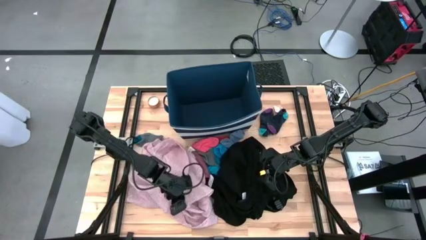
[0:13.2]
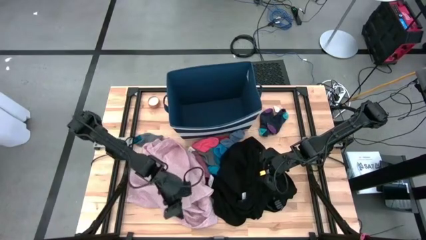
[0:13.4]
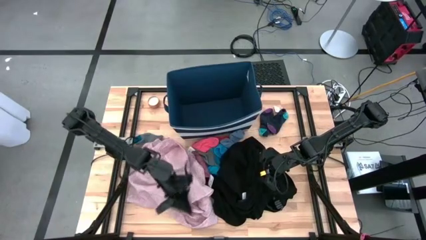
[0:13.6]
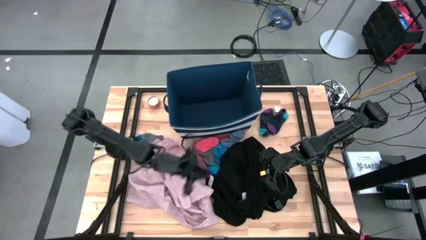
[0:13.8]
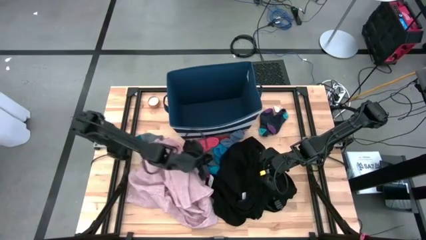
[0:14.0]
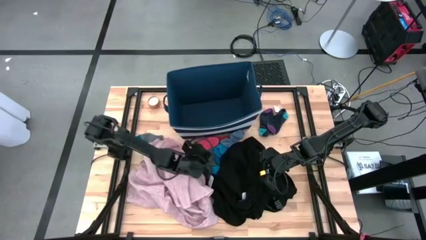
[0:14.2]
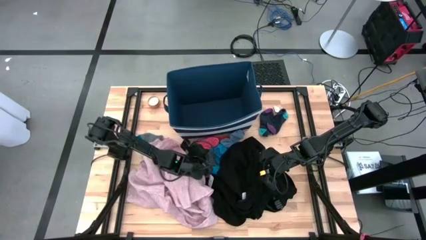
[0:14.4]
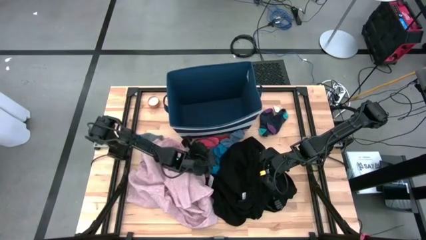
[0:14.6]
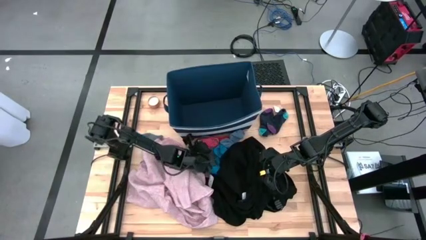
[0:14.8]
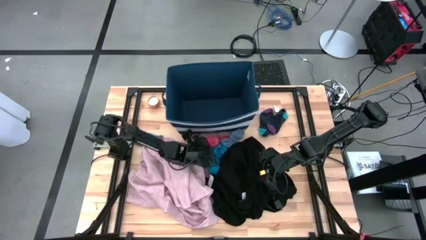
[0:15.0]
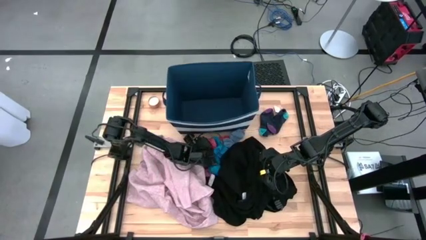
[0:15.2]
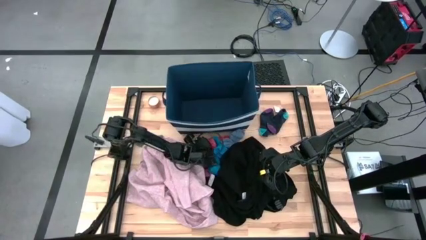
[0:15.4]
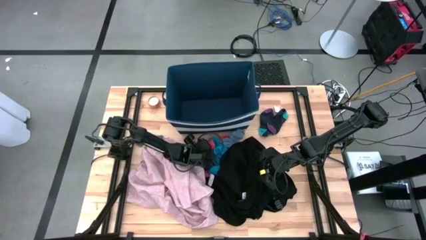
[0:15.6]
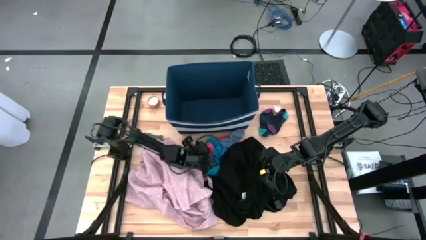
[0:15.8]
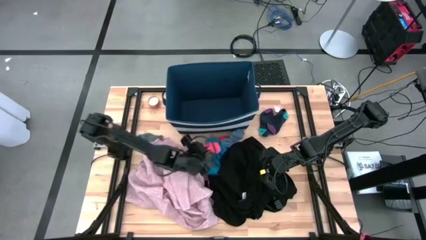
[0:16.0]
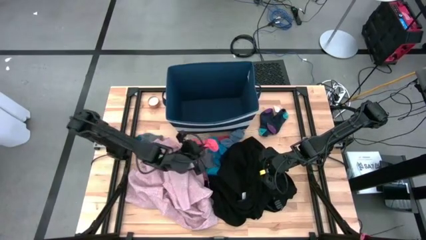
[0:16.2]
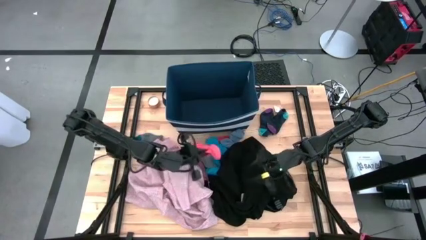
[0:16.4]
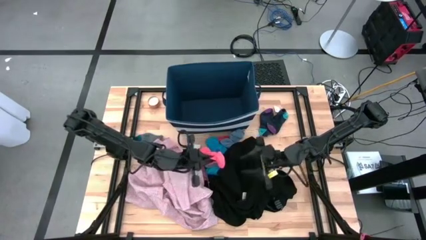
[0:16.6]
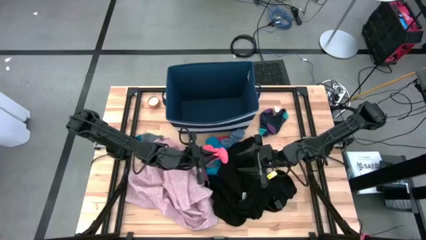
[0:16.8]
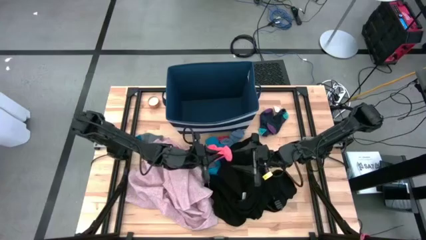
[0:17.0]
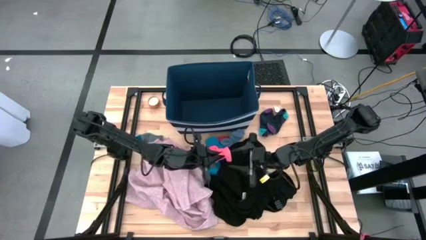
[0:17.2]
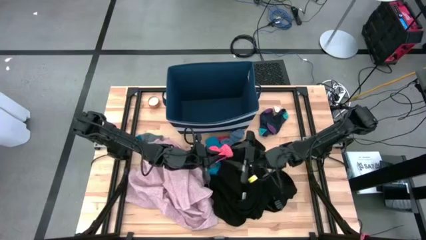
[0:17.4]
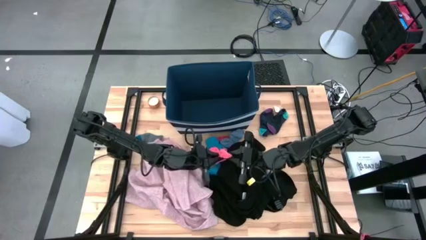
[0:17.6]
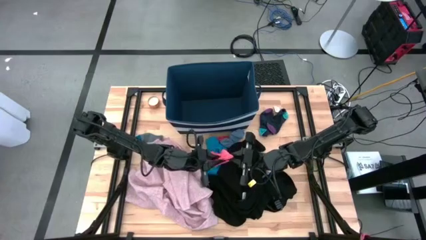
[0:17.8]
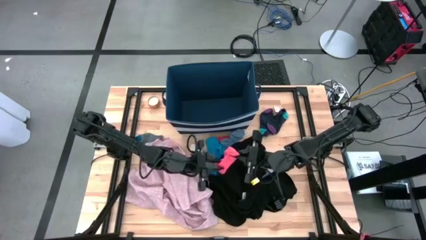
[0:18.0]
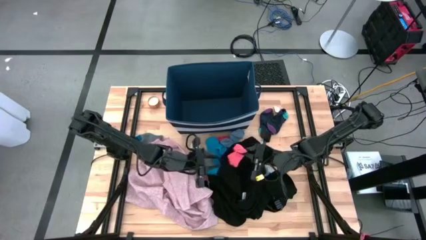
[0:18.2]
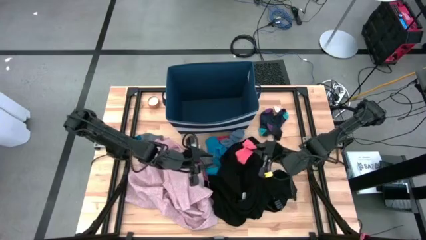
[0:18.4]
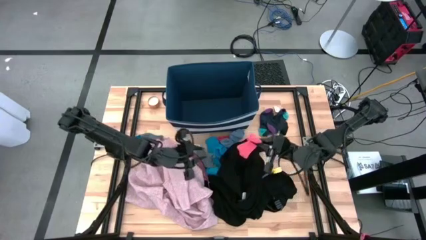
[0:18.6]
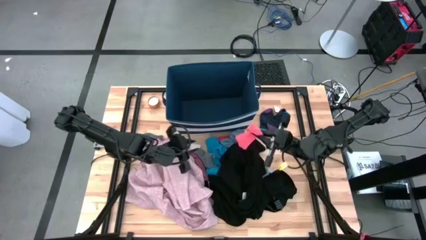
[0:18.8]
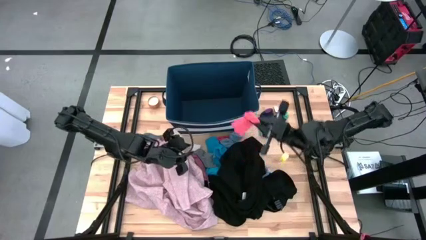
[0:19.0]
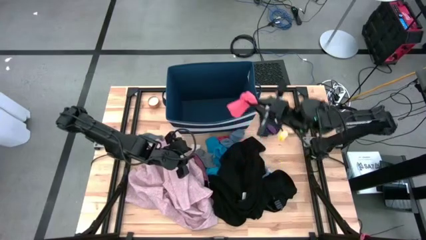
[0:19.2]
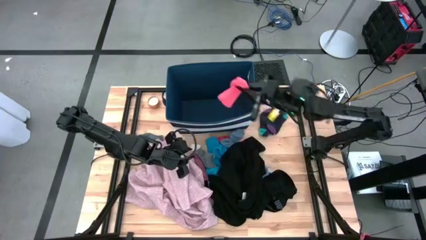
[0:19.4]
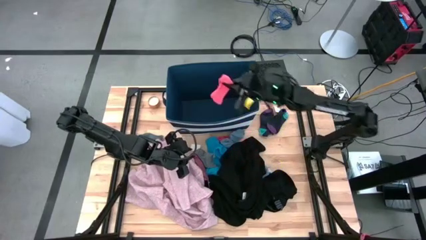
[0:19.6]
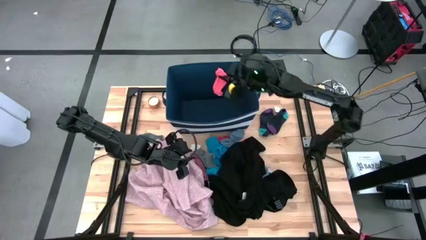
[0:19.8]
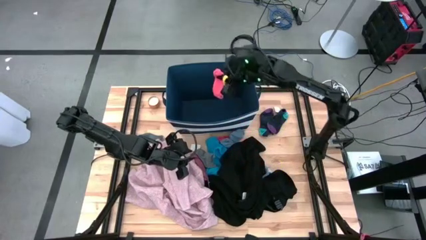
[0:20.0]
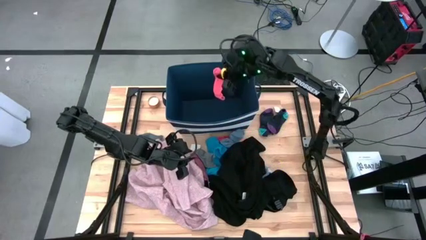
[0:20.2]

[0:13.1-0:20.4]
Task: Sort clothes
Put the pink sock into the blue laundry bin

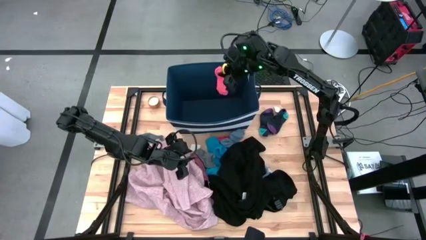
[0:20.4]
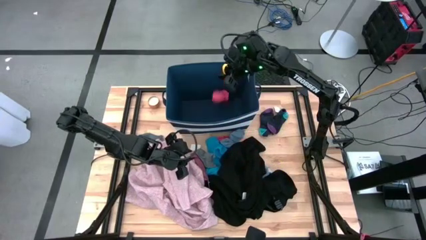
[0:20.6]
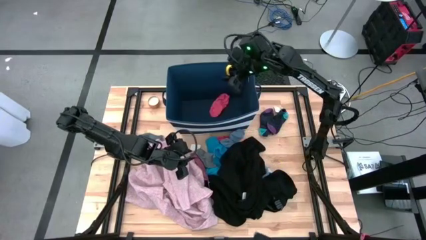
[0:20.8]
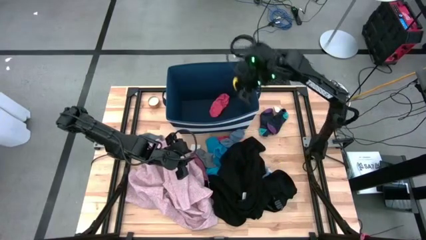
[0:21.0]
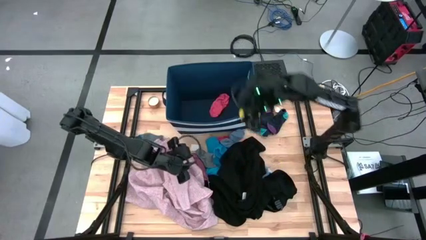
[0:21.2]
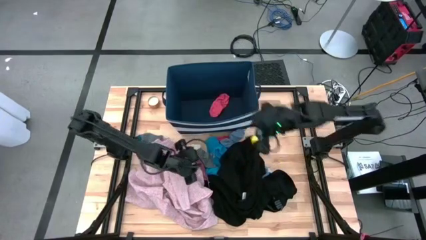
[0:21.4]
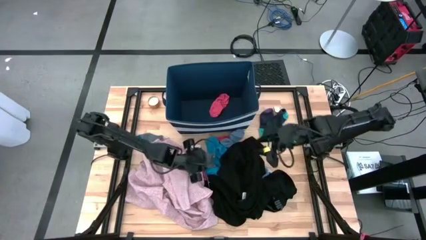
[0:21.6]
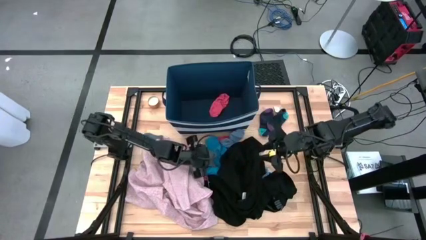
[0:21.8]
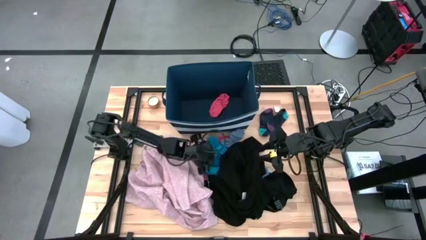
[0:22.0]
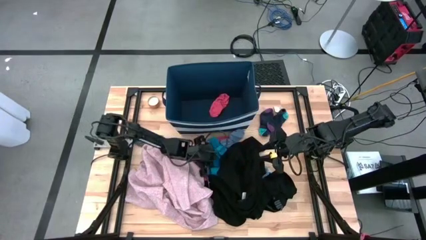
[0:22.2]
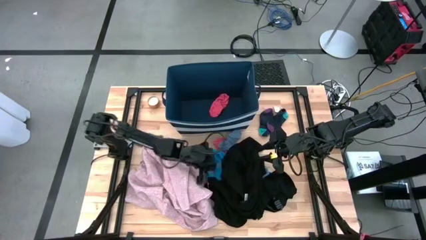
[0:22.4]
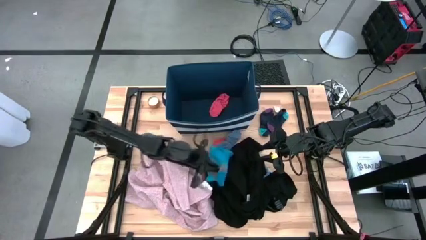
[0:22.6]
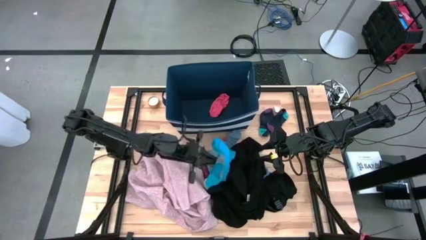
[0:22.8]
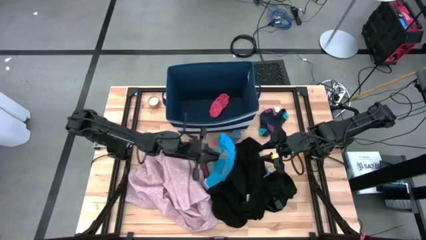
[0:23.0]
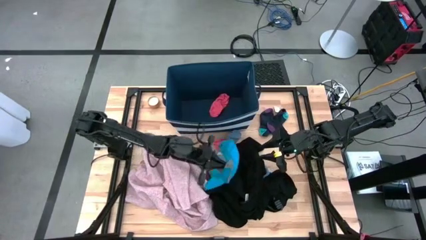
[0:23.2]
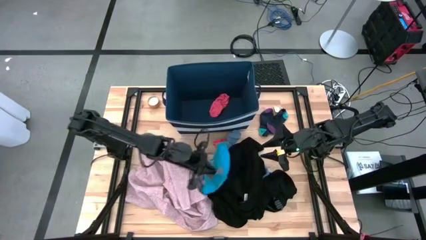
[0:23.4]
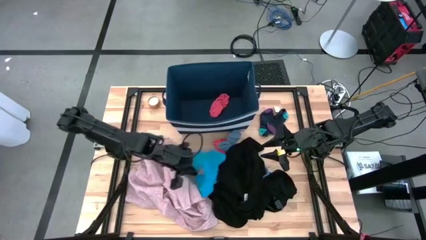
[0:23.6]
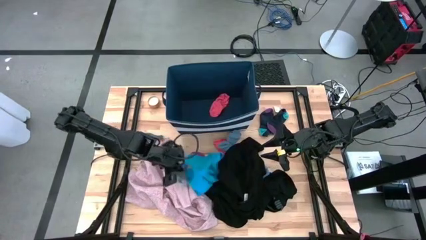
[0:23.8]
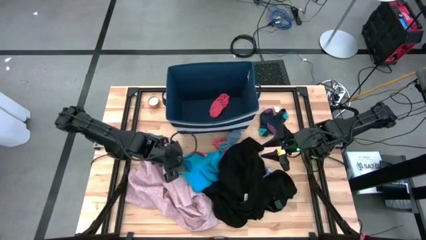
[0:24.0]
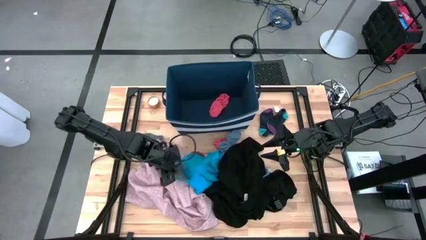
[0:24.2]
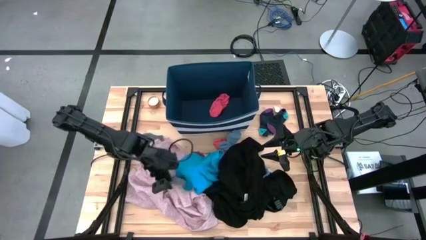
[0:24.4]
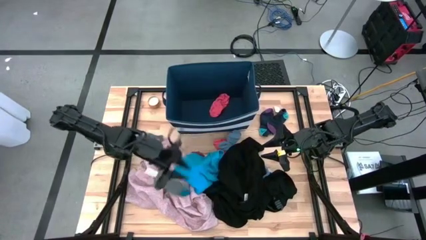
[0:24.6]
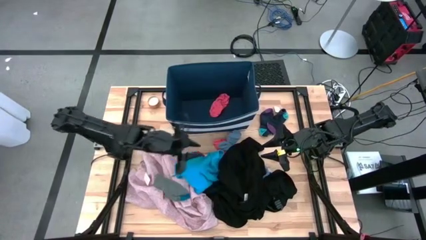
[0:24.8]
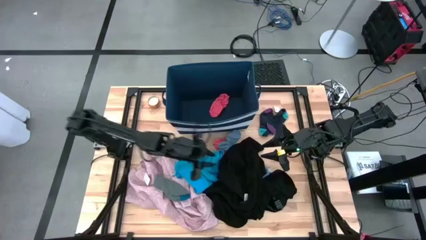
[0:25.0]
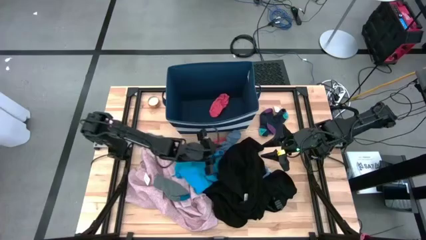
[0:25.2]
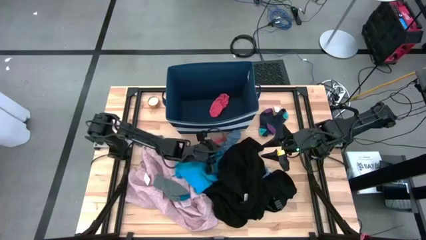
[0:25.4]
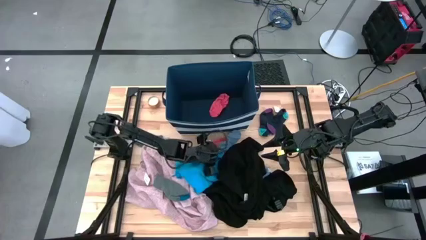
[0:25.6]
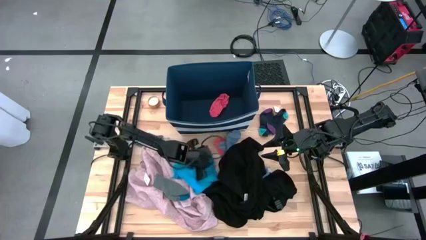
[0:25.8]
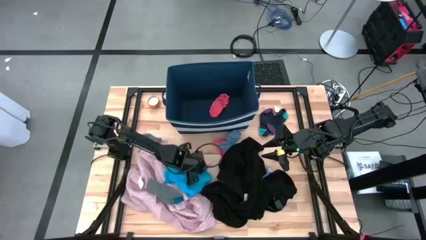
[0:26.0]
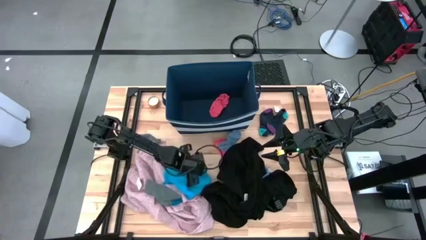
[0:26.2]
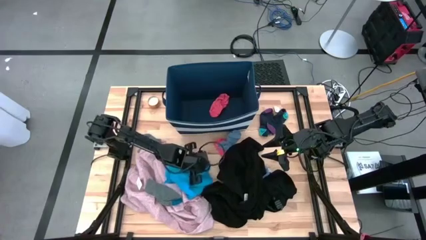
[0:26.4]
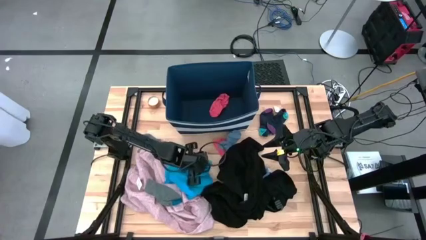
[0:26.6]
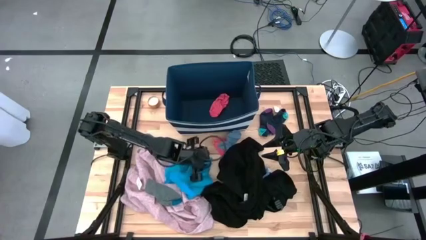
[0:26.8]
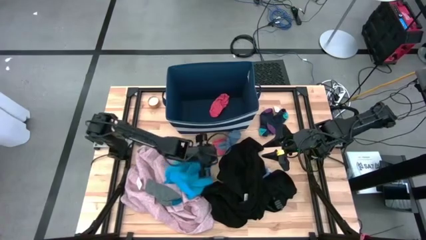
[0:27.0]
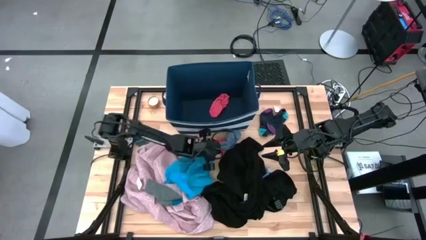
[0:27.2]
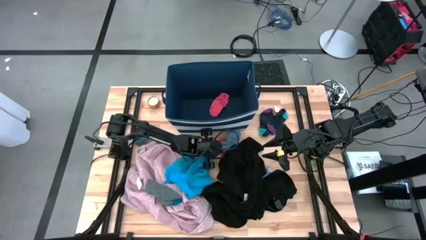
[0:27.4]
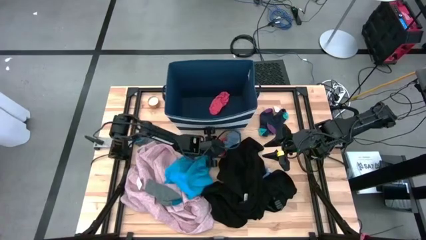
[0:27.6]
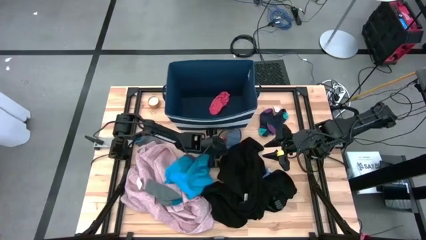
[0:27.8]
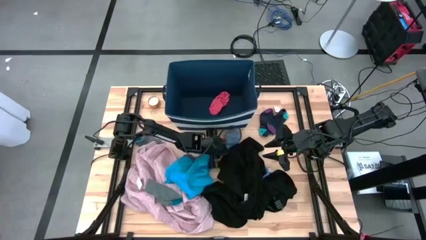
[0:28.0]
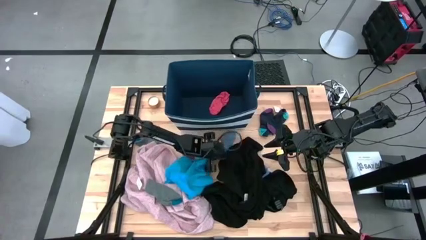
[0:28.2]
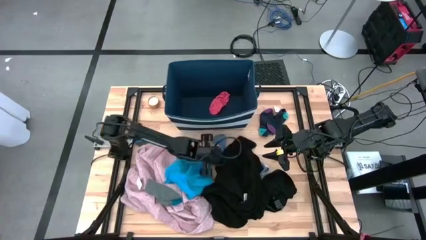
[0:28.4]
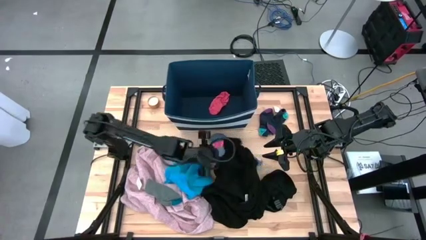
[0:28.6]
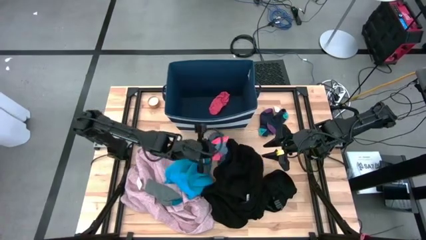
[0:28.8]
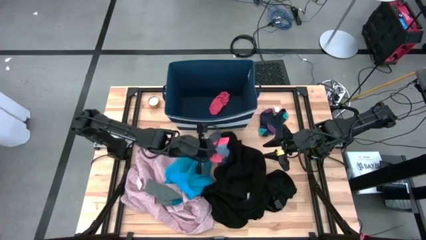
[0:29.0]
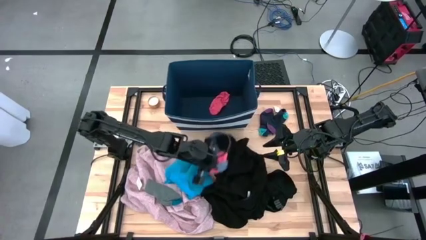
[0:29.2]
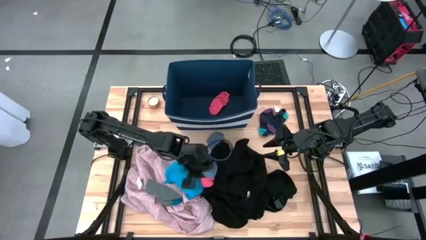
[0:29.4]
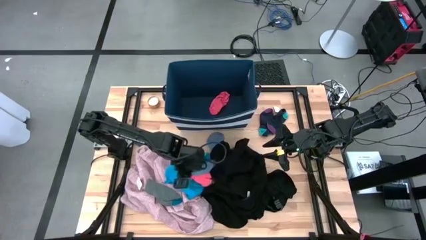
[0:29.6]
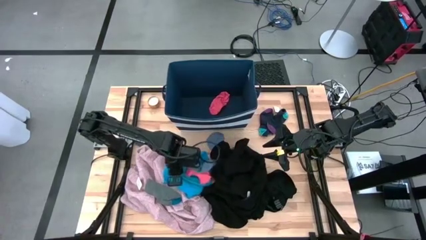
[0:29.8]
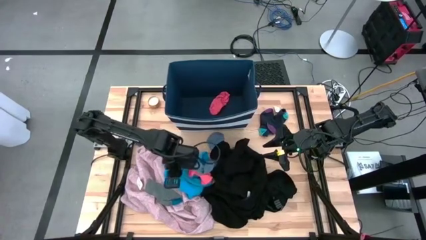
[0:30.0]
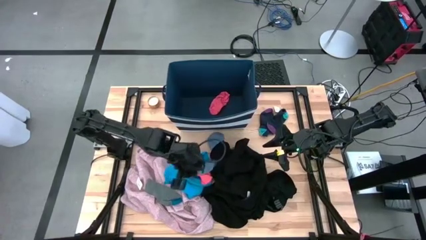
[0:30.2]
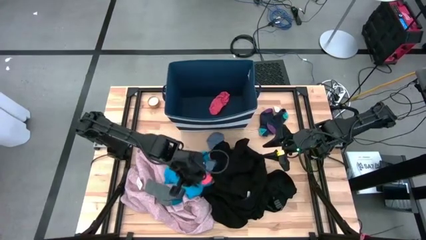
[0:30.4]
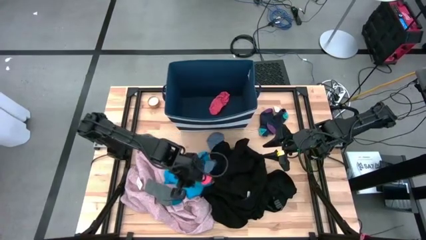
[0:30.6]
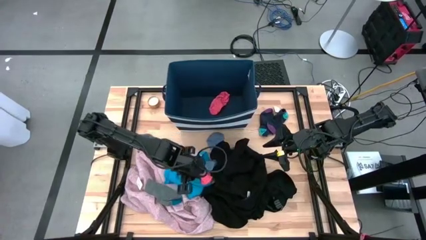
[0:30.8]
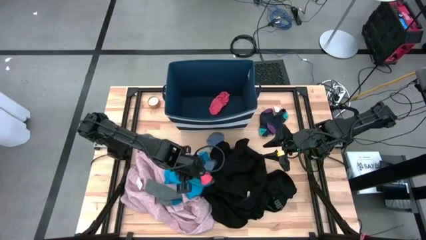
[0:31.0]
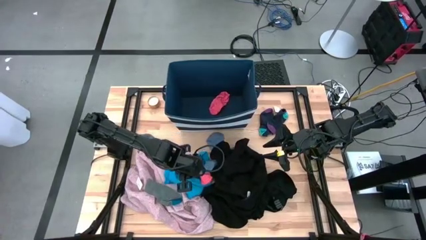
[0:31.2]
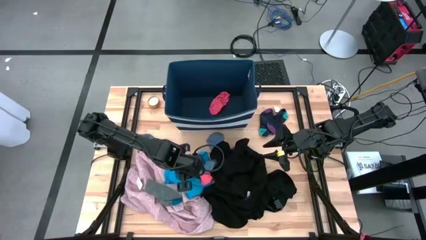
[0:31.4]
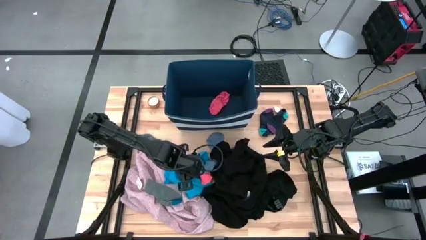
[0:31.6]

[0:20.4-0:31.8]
Put the pink sock into the blue laundry bin
